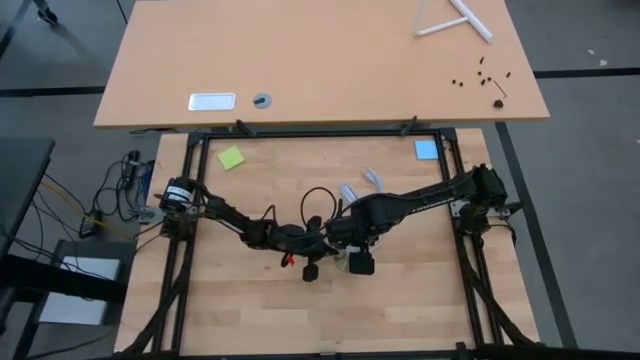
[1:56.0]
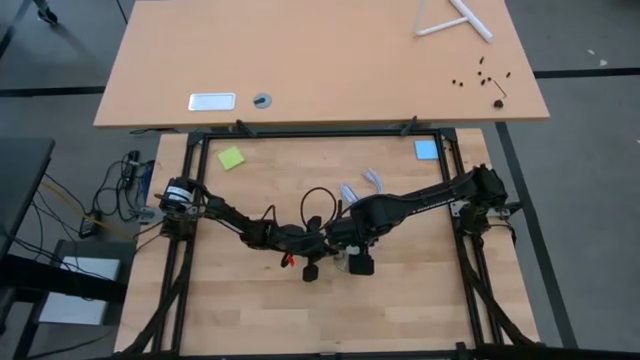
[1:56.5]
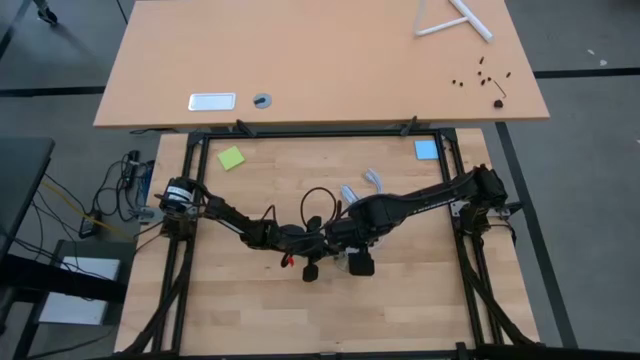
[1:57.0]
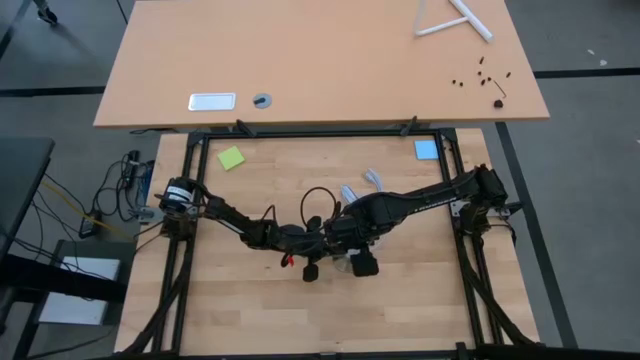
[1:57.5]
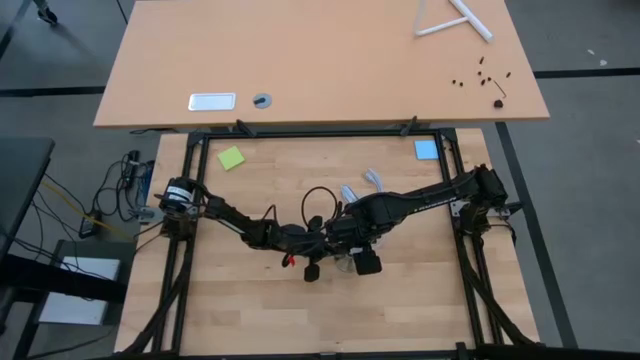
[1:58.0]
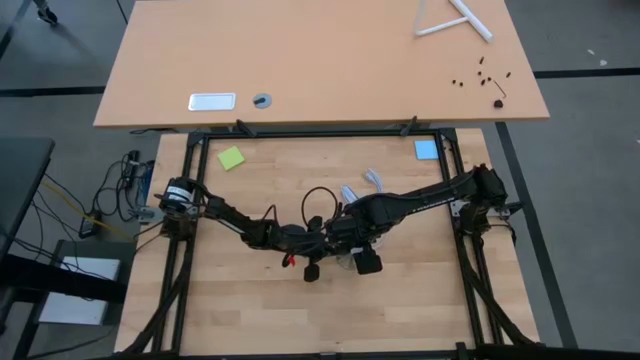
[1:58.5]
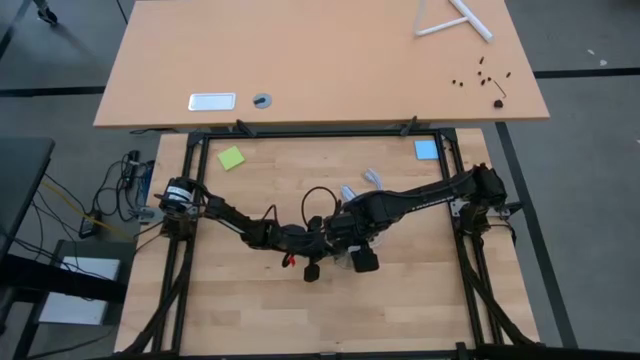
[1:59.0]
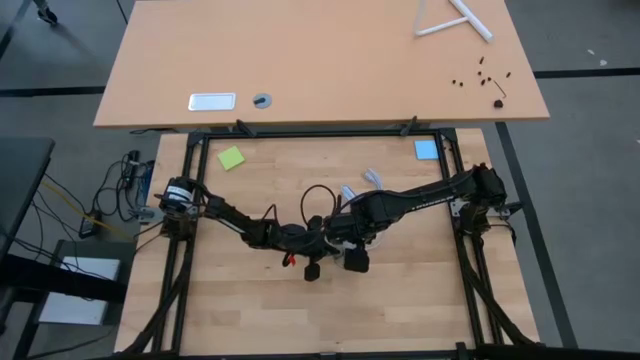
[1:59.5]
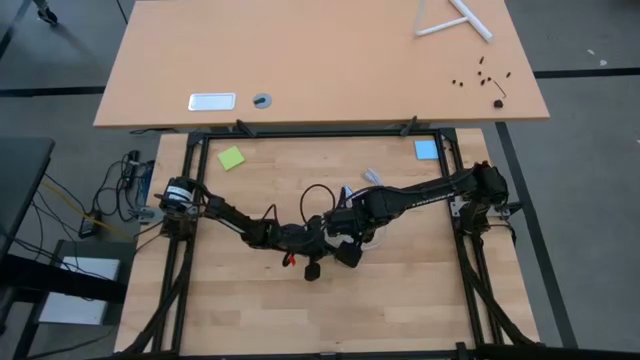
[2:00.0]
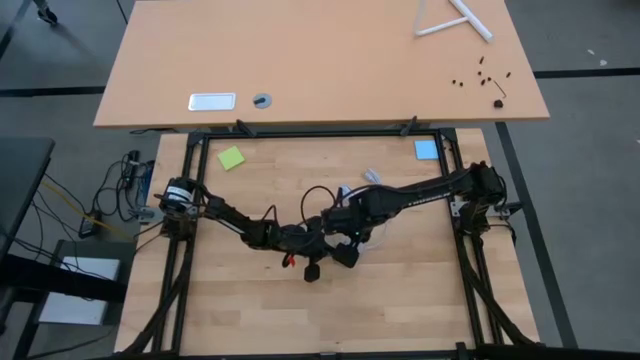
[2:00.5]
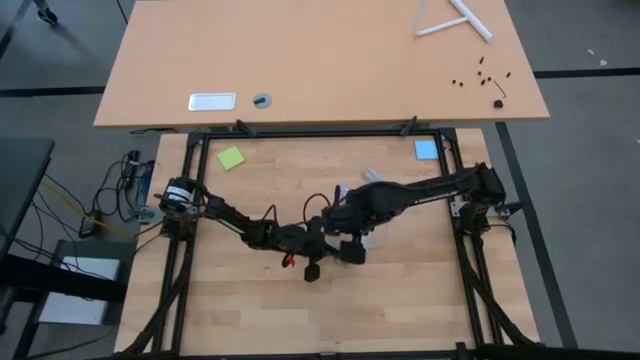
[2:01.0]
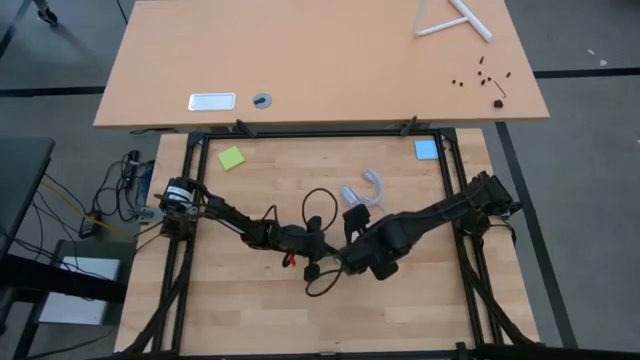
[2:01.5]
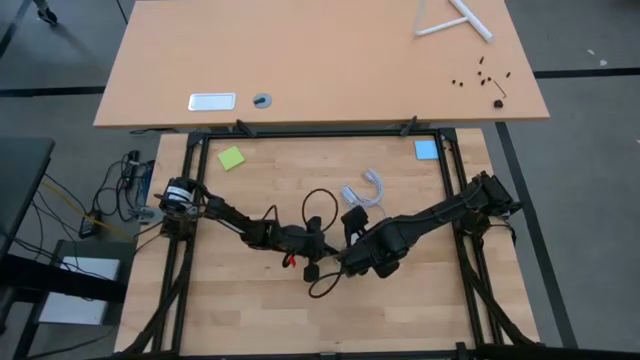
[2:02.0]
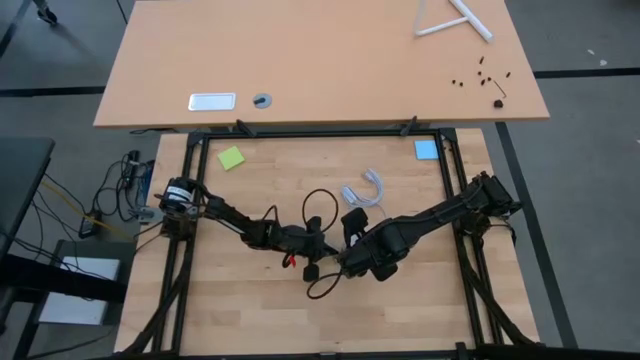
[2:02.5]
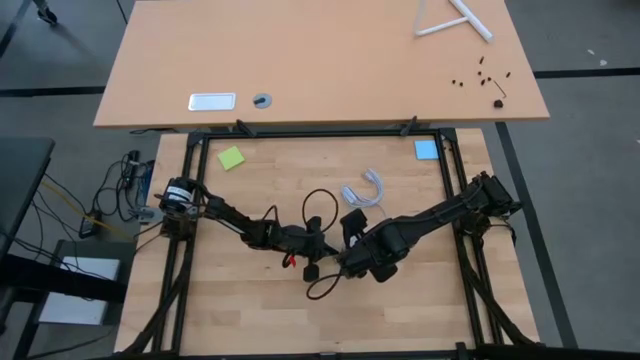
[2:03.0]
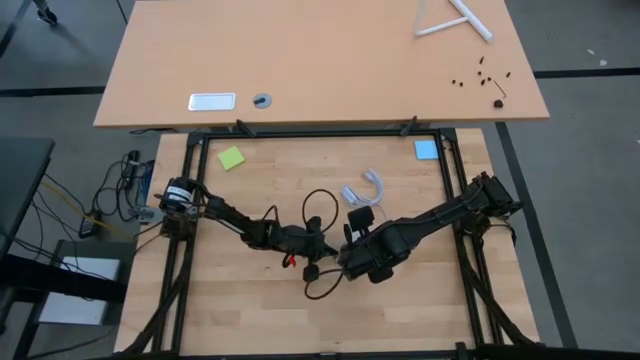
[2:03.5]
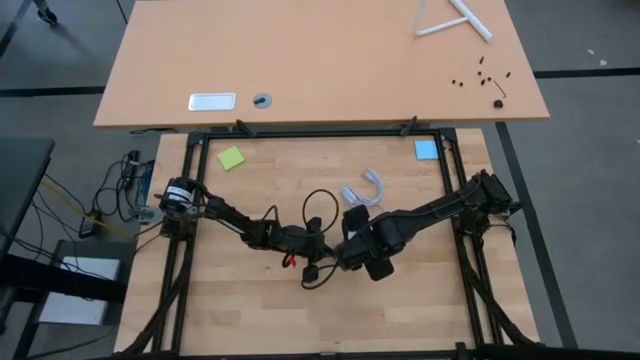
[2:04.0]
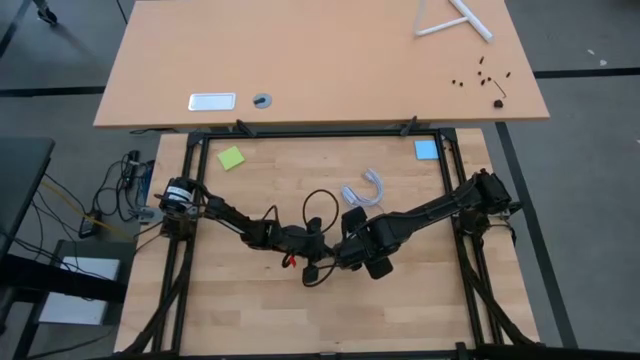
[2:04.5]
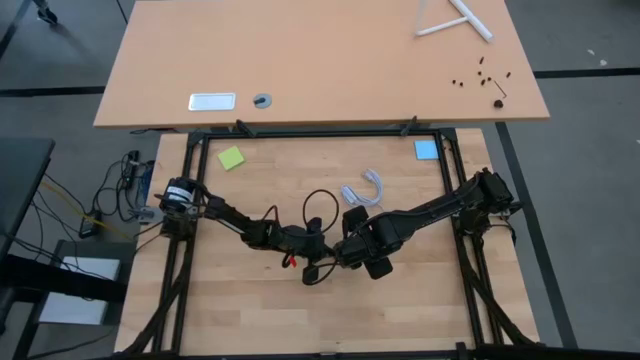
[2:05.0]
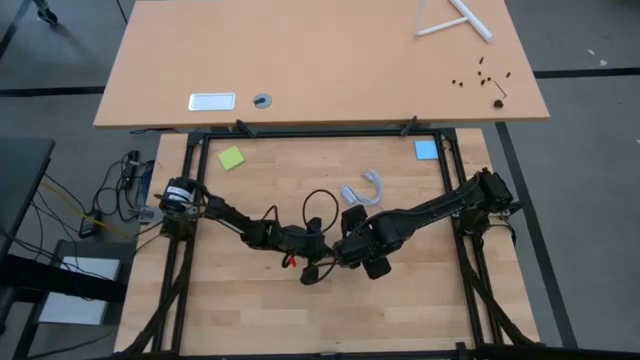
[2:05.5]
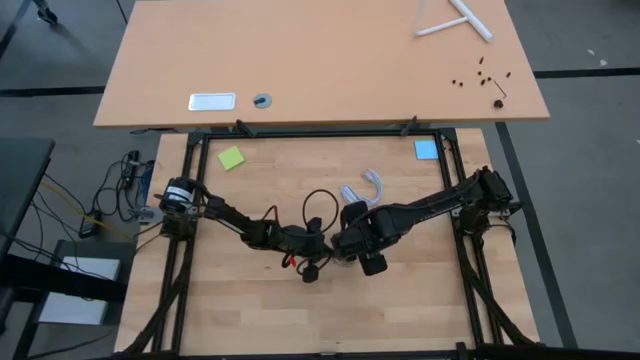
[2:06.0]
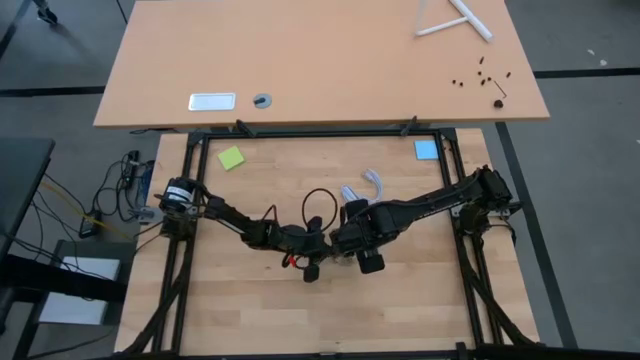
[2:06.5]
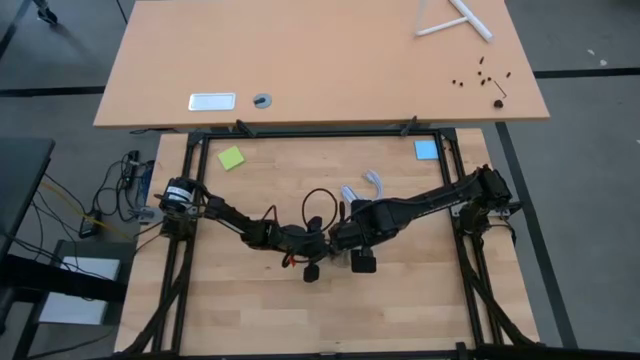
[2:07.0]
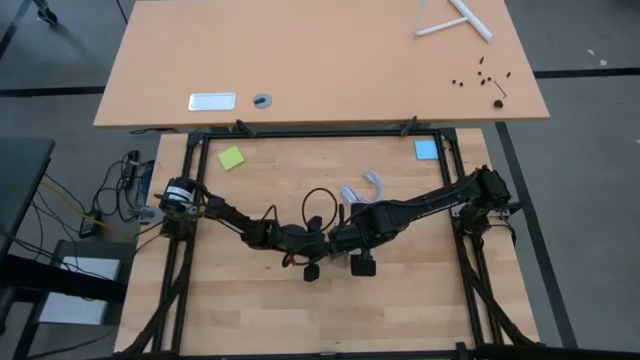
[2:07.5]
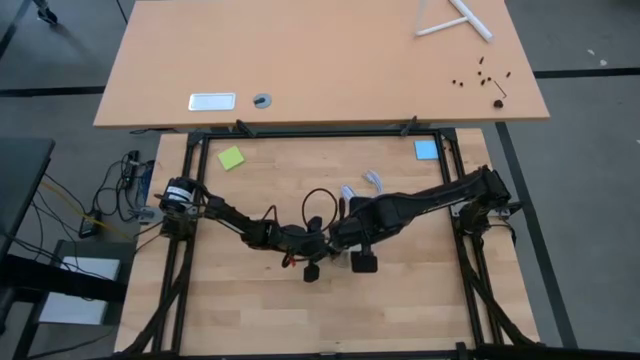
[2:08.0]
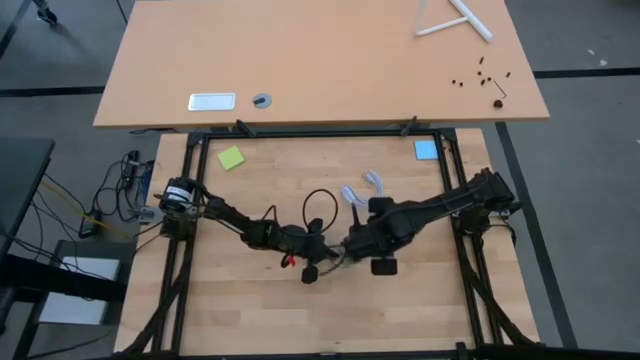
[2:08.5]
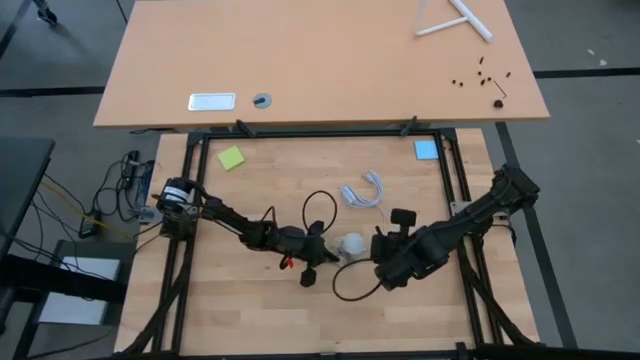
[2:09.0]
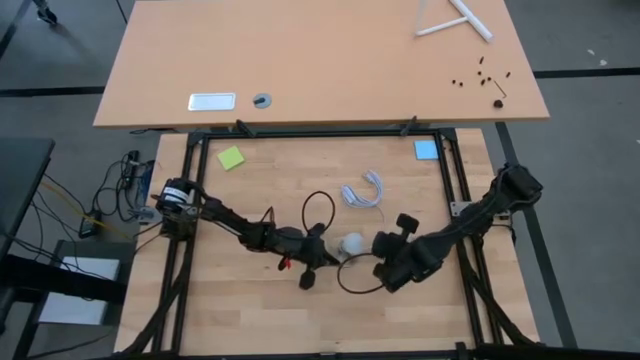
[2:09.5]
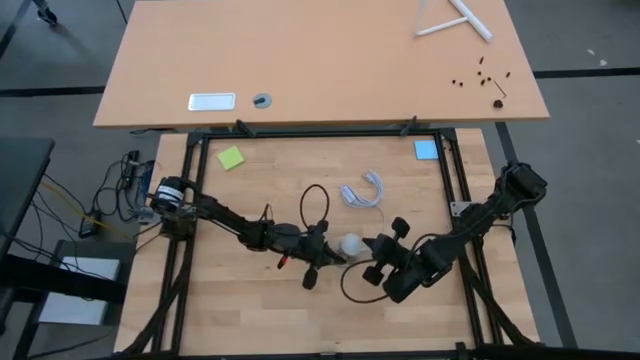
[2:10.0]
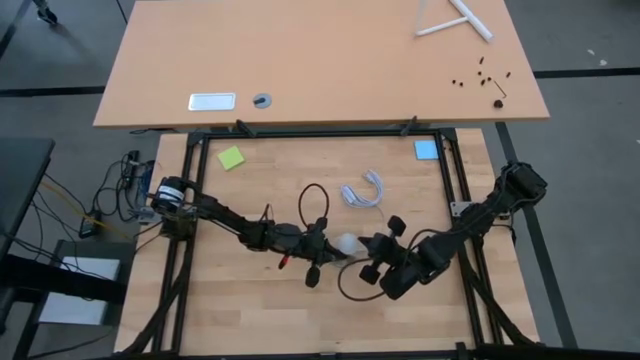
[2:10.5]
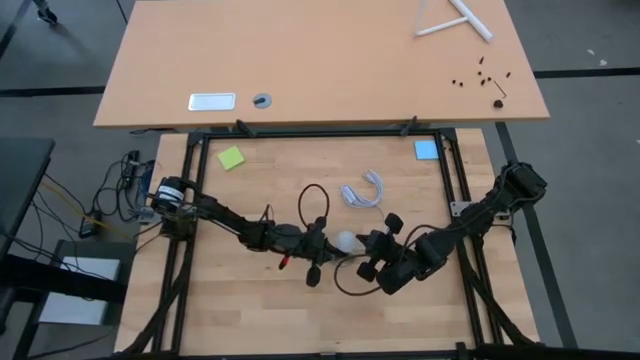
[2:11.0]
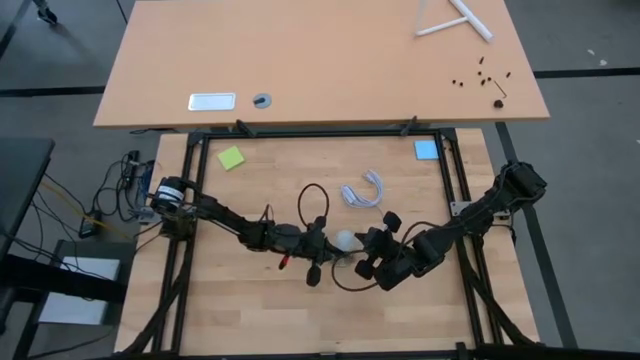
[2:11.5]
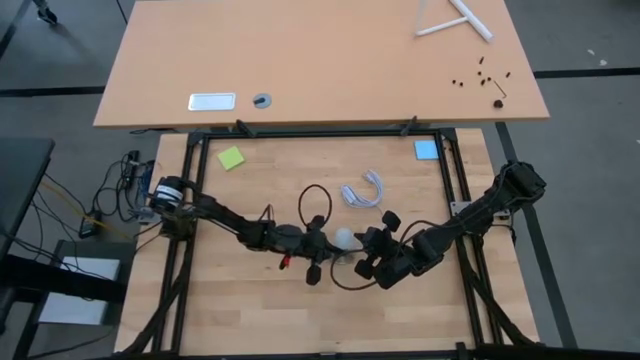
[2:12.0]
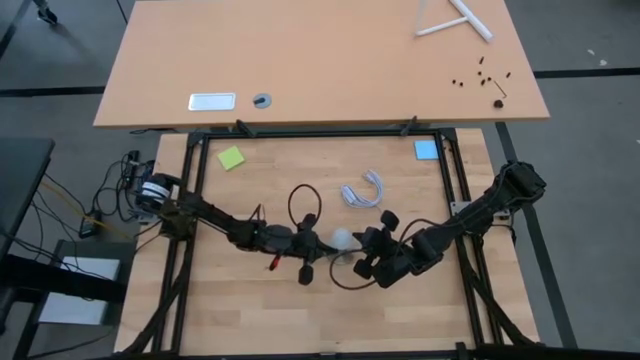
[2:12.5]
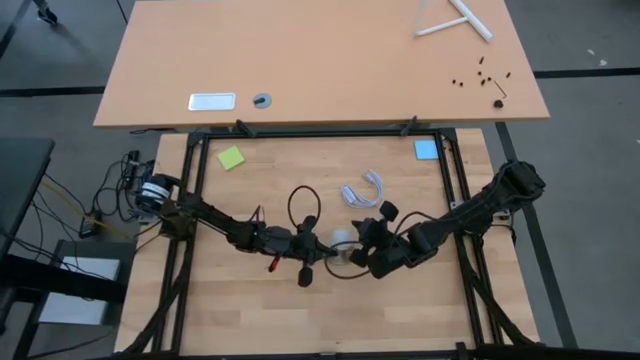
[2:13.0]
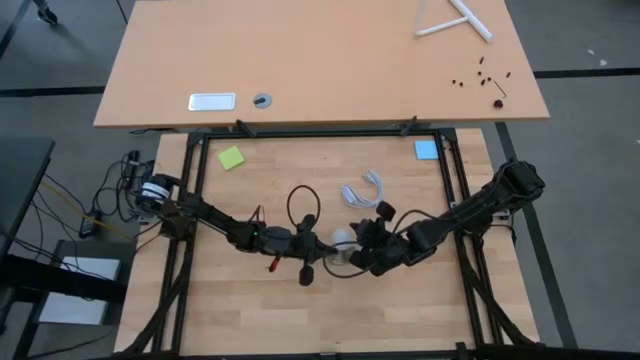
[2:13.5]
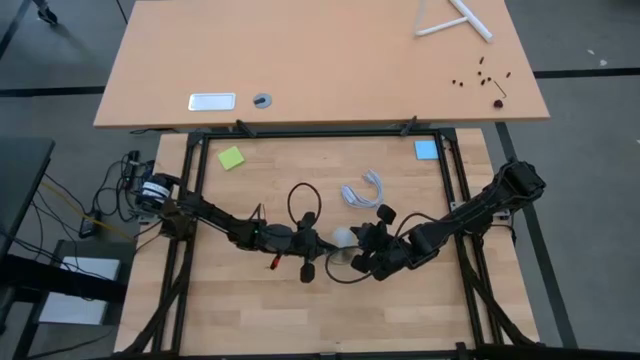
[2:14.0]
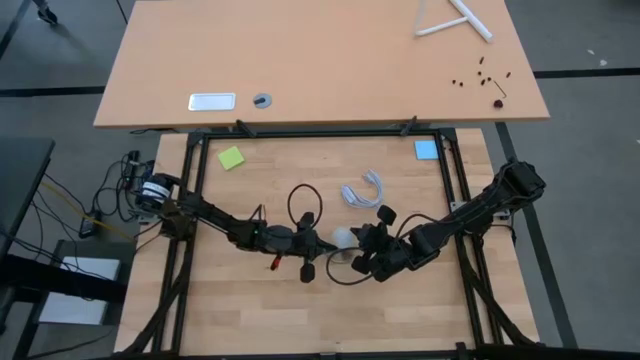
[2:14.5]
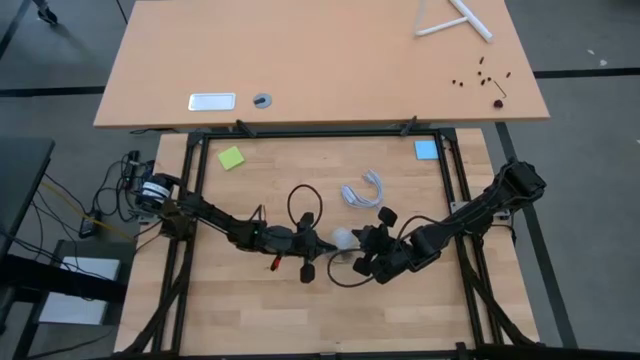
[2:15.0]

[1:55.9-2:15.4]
Task: Screw lightbulb
Insert the lightbulb into the lamp
